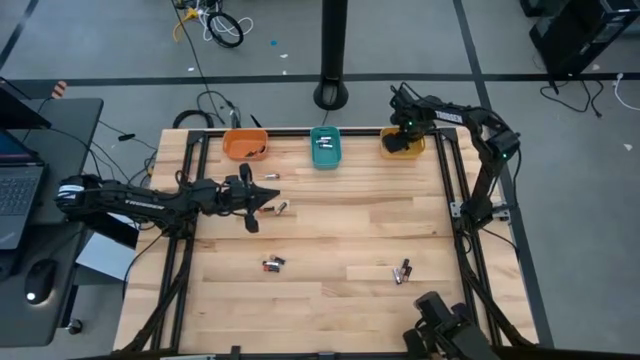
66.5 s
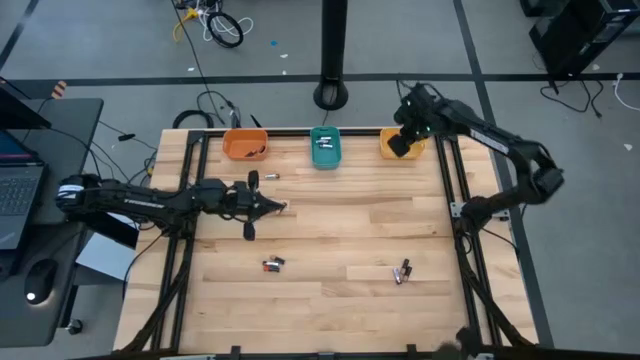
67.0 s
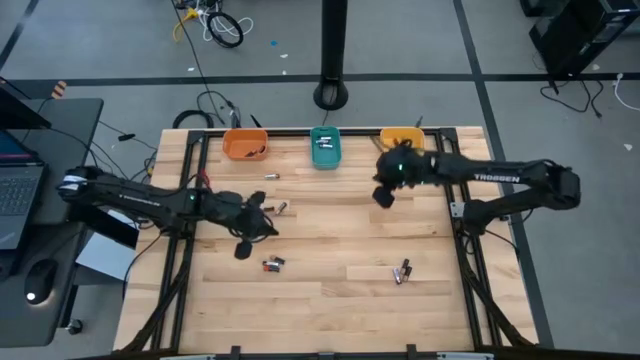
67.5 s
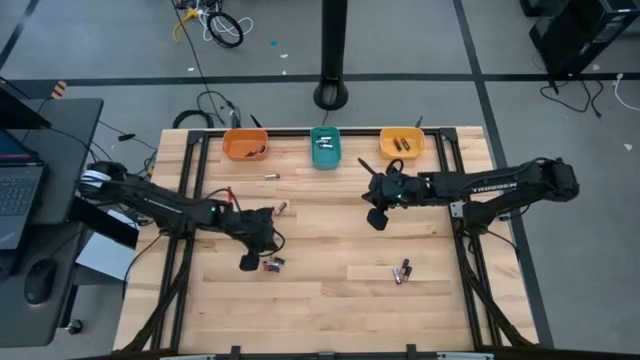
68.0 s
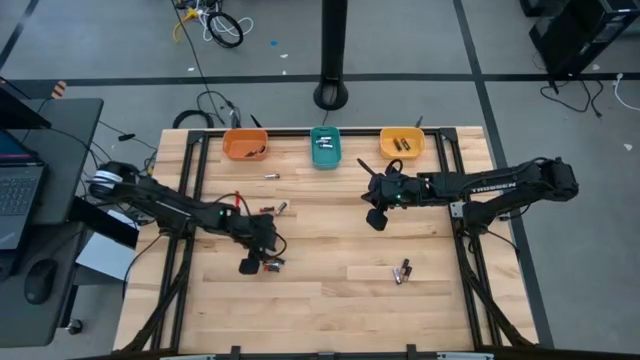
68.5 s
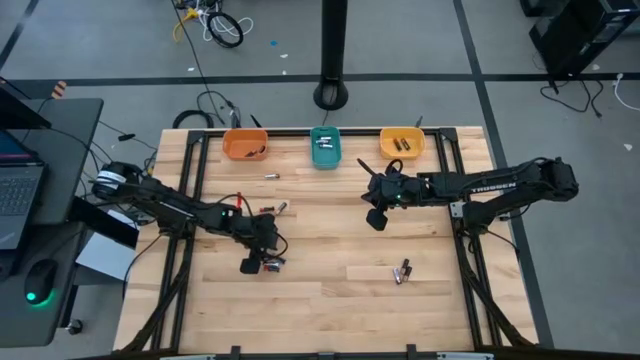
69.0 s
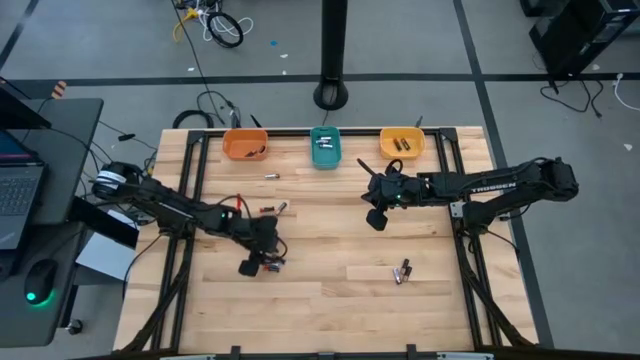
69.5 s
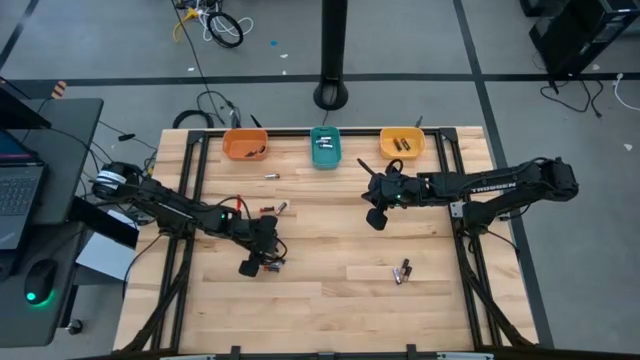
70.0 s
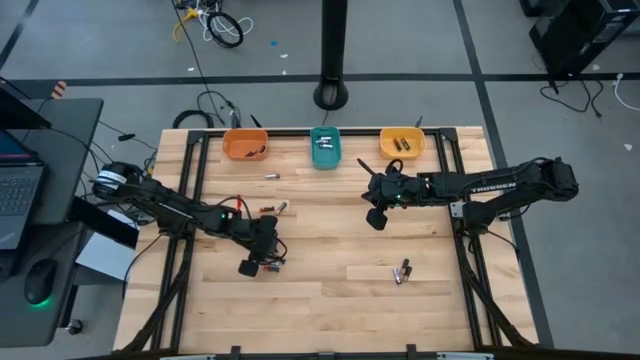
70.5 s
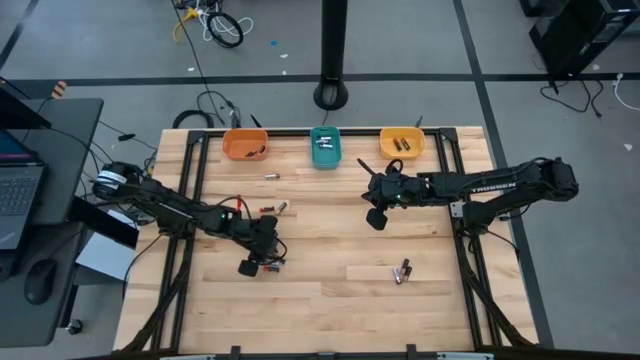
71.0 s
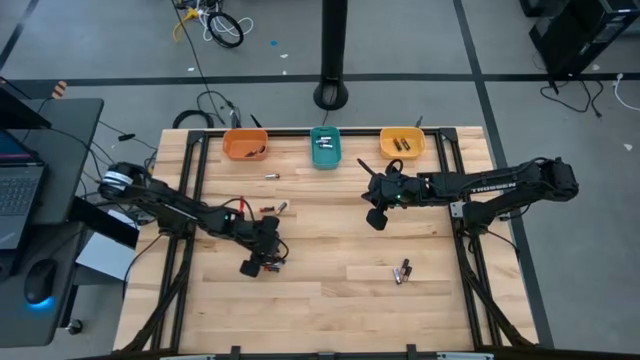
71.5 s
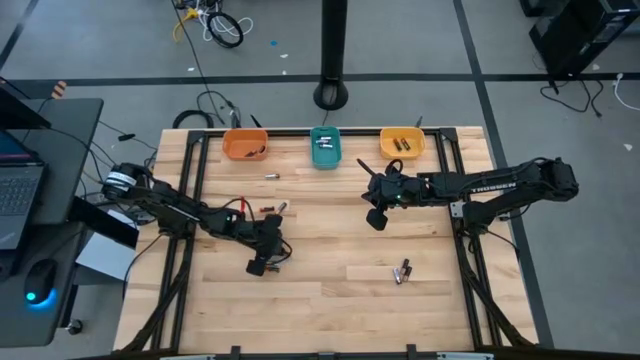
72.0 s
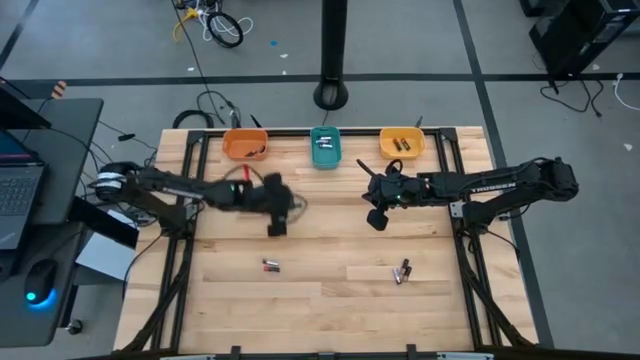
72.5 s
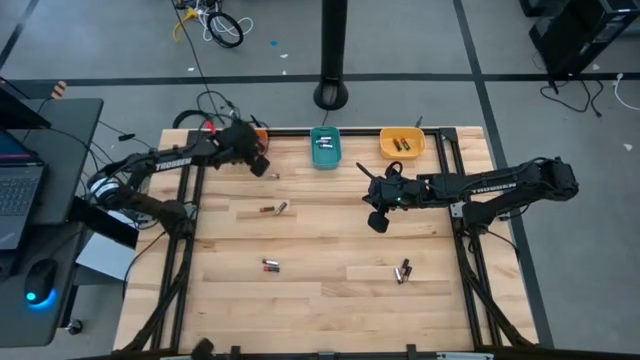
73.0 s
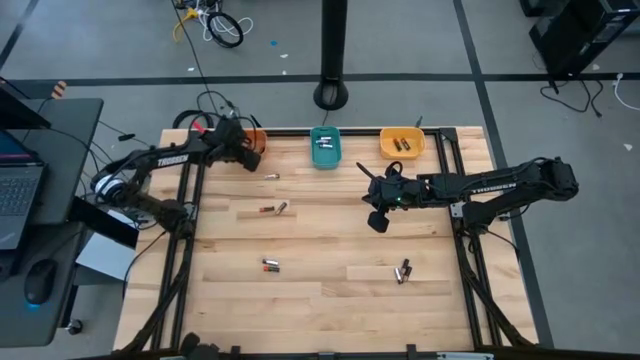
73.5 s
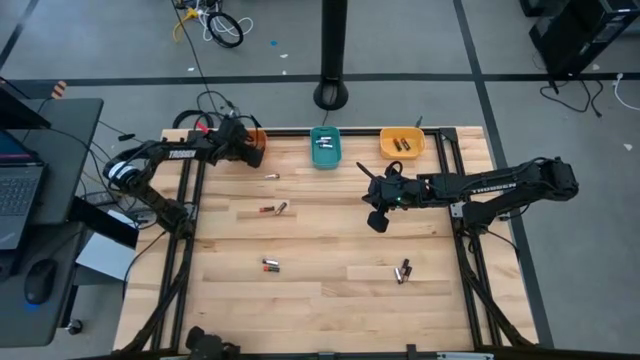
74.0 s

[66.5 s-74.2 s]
Task: Sort batteries
Put the brown-black battery in the orange bin

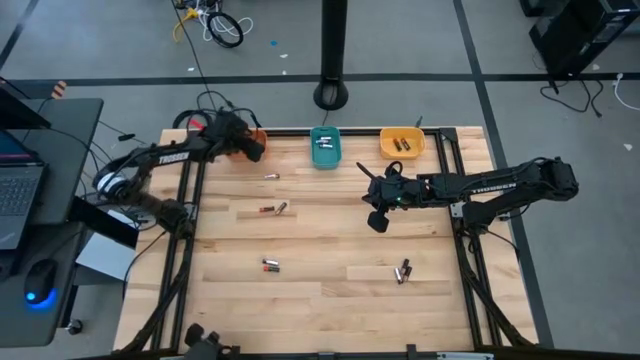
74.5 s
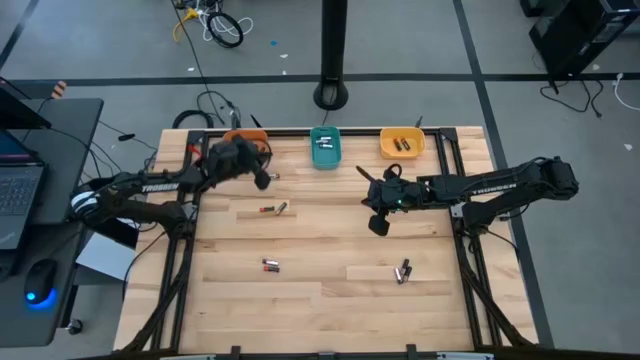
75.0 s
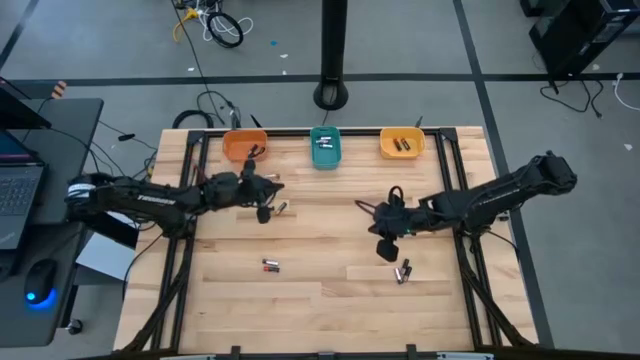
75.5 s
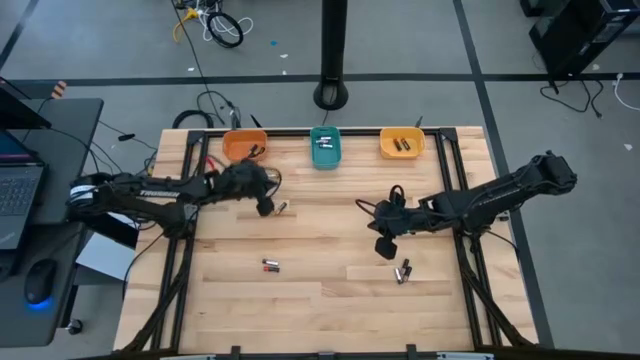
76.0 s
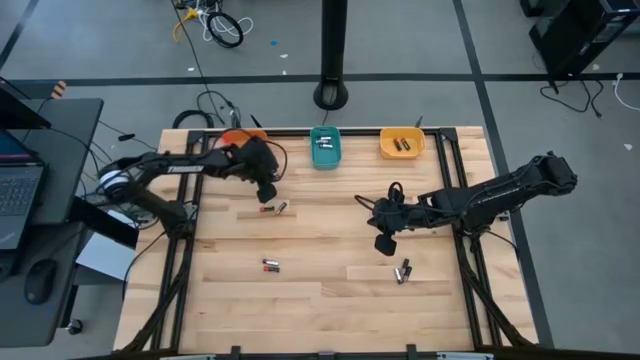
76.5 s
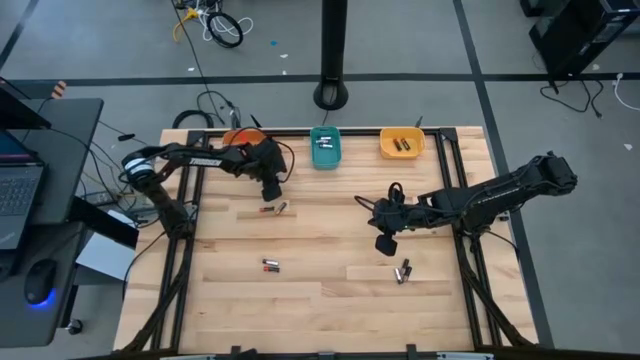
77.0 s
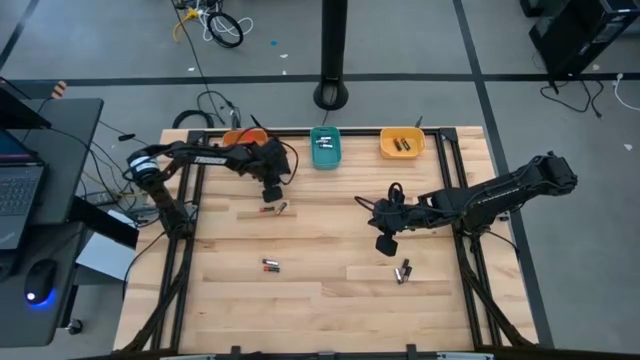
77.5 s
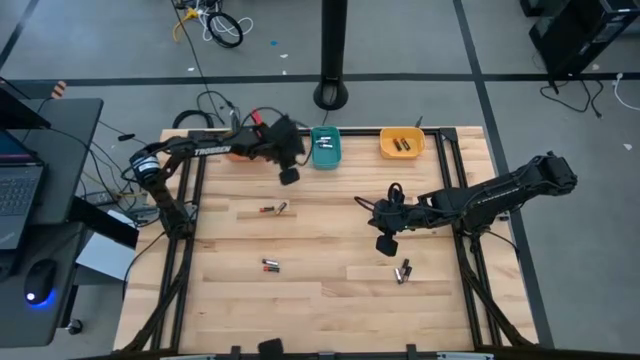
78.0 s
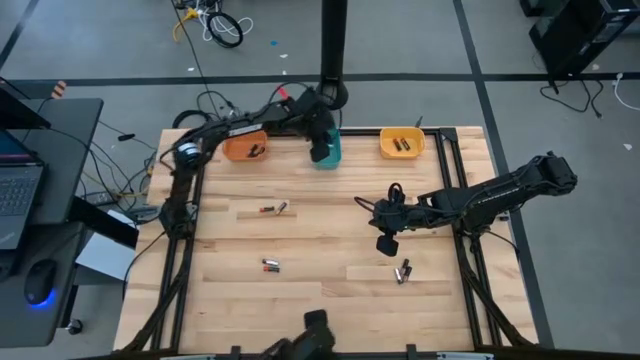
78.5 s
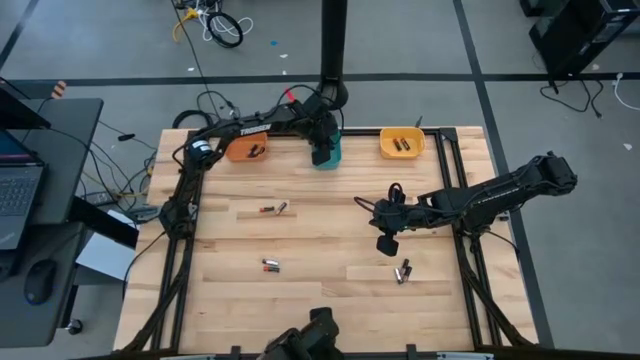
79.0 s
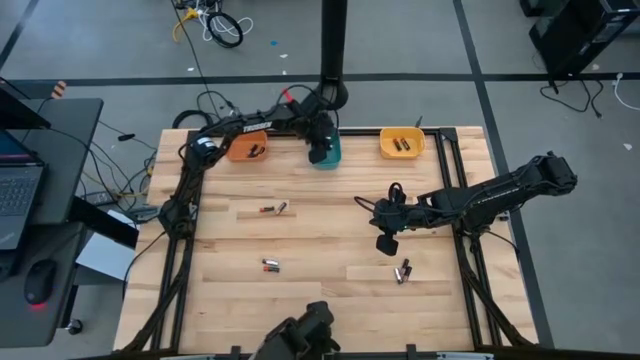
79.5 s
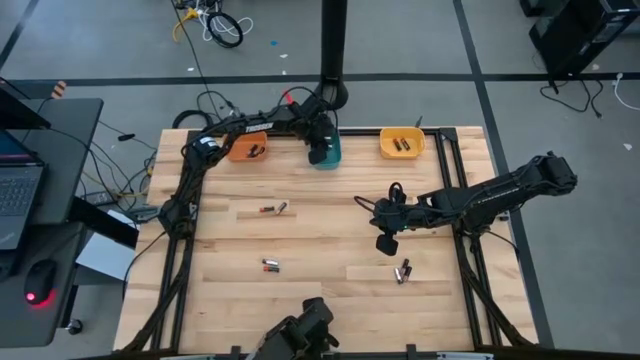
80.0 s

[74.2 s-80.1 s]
Put the black-silver battery in the green bin

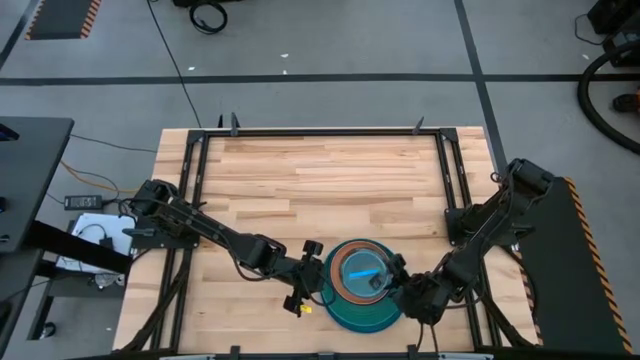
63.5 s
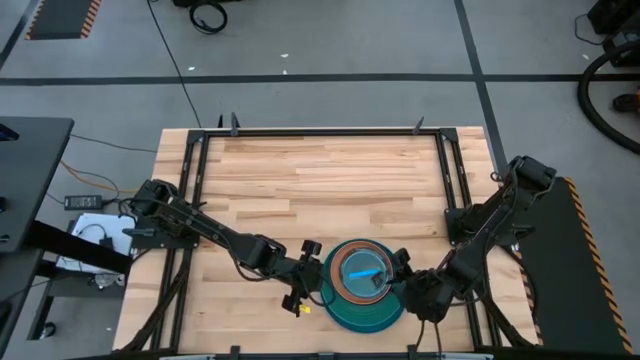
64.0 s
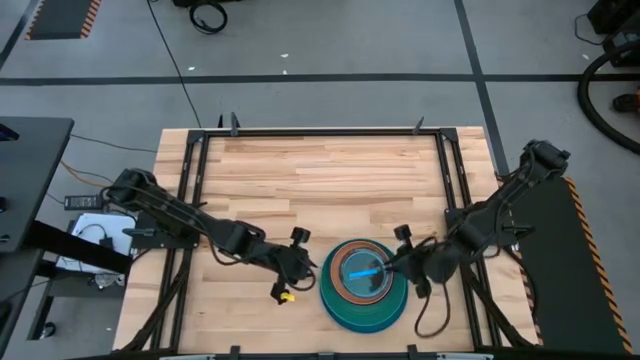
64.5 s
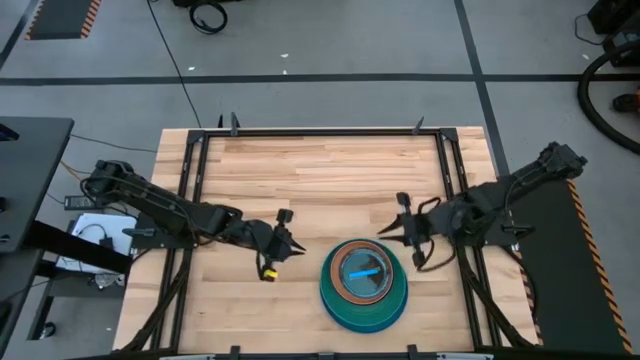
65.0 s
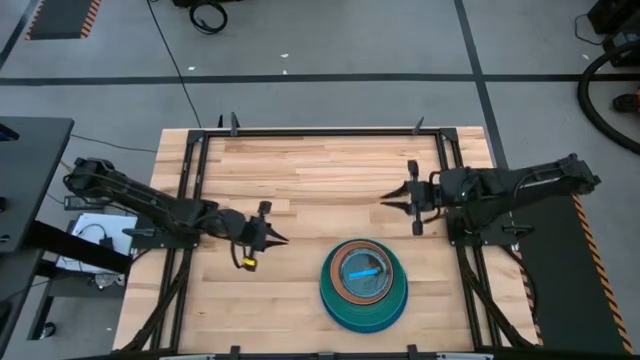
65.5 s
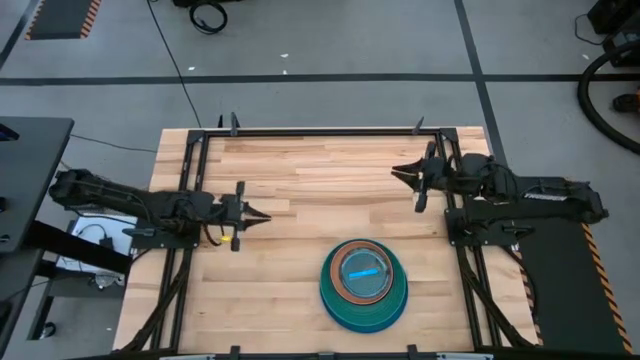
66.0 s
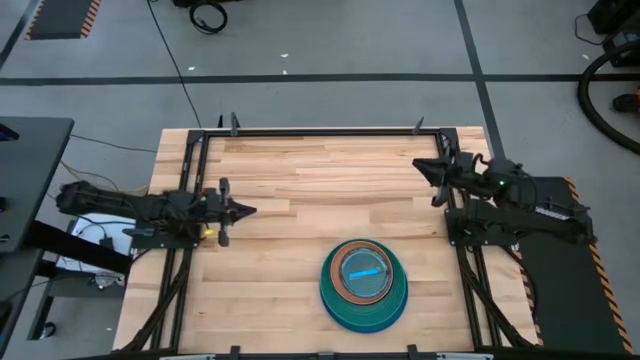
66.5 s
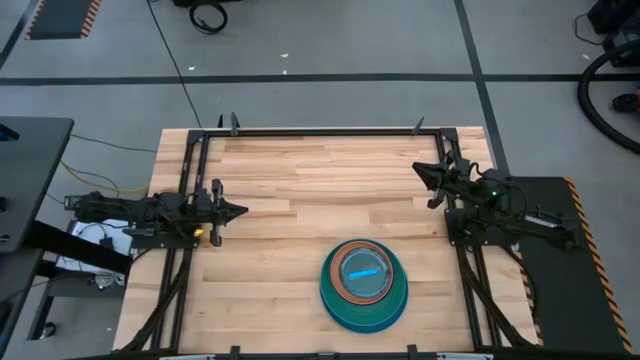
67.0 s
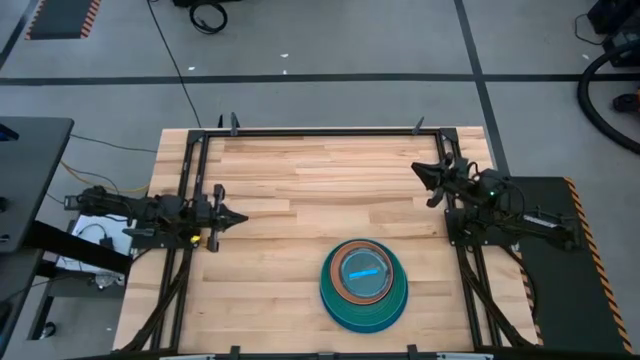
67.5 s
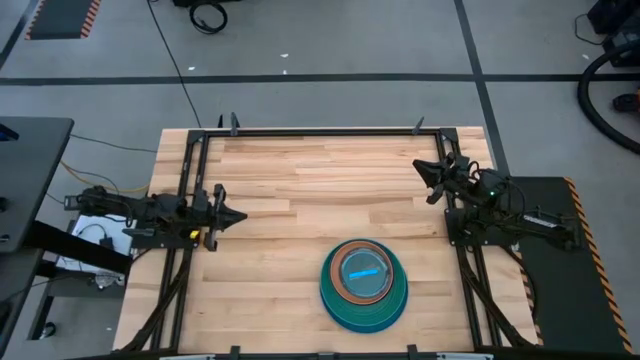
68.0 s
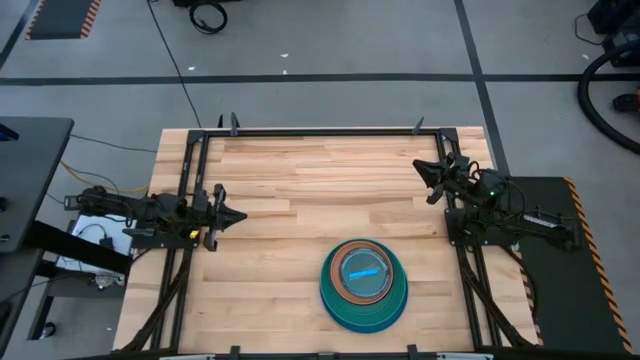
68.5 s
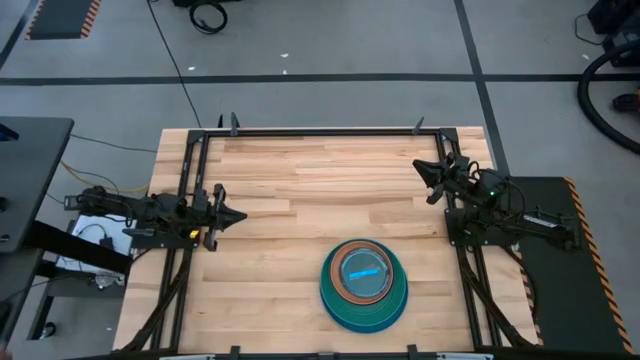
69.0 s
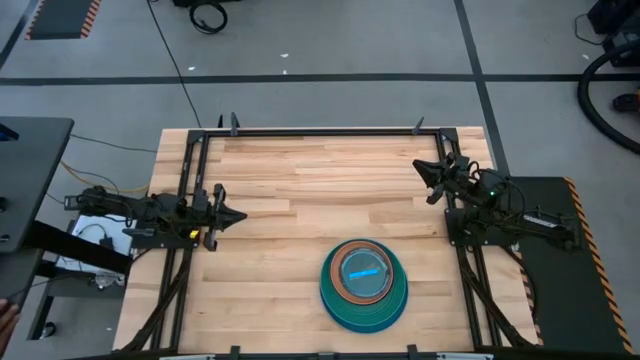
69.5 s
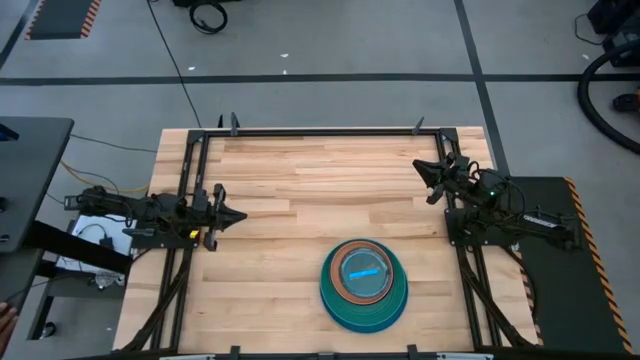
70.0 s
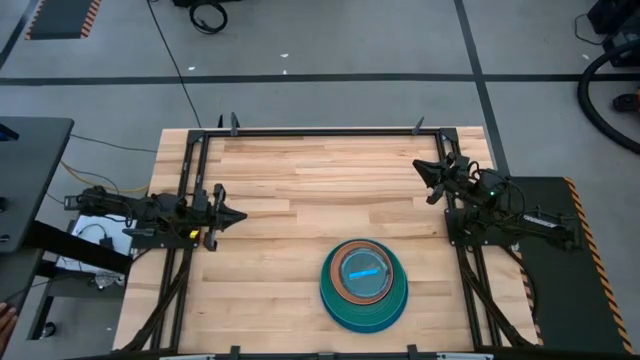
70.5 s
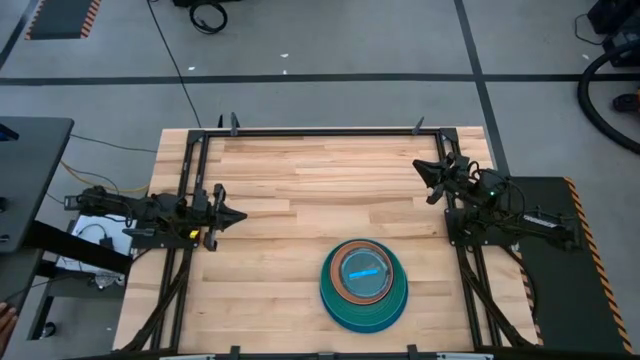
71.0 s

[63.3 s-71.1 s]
Task: Stack plastic plates
Return to Home Position
